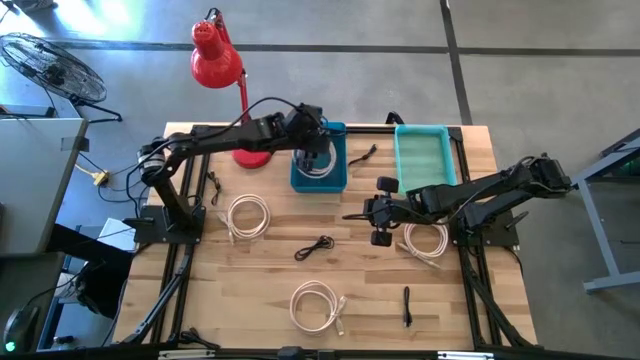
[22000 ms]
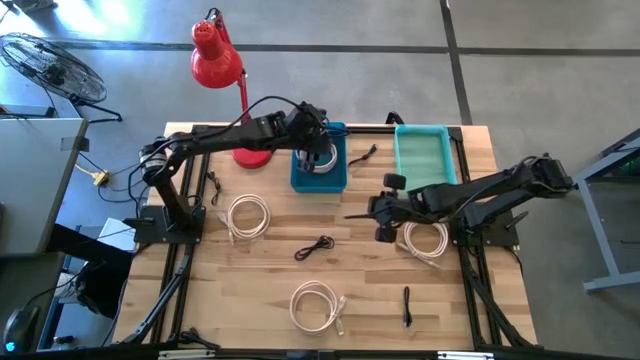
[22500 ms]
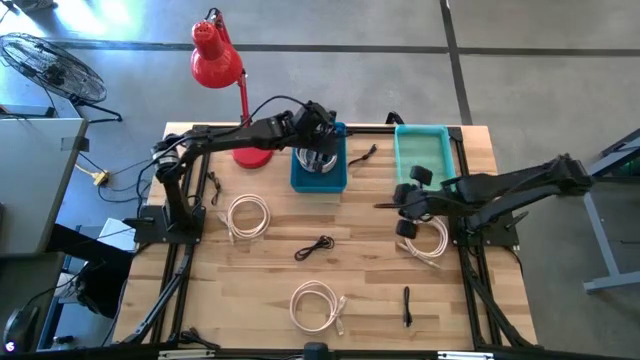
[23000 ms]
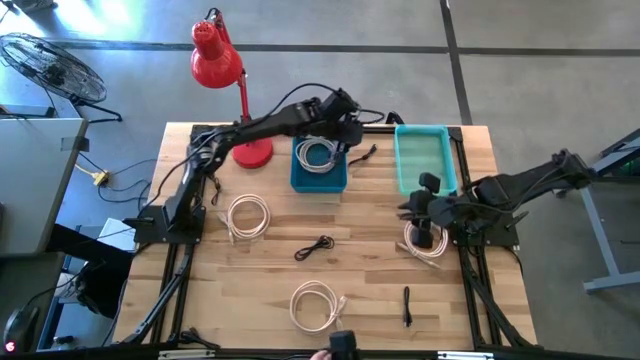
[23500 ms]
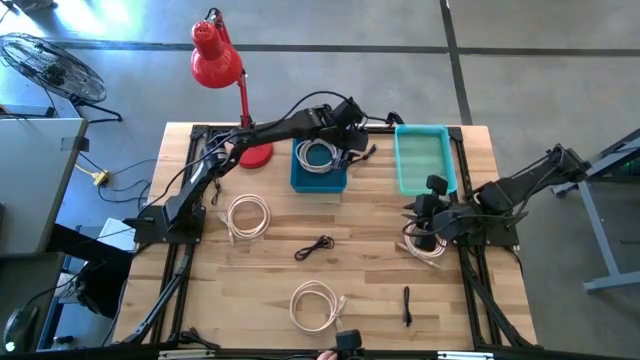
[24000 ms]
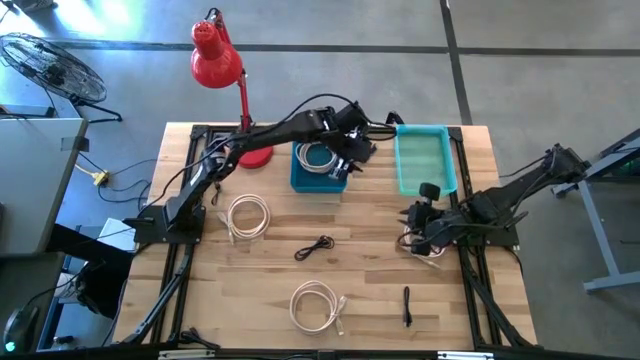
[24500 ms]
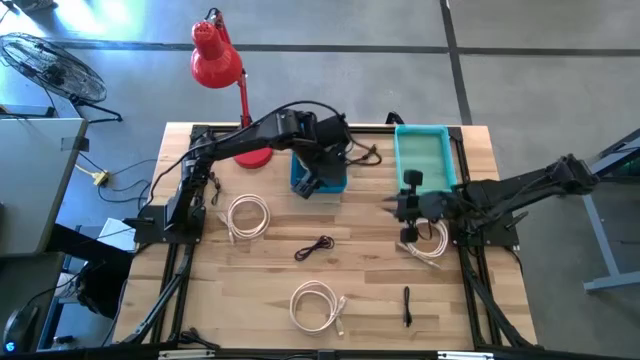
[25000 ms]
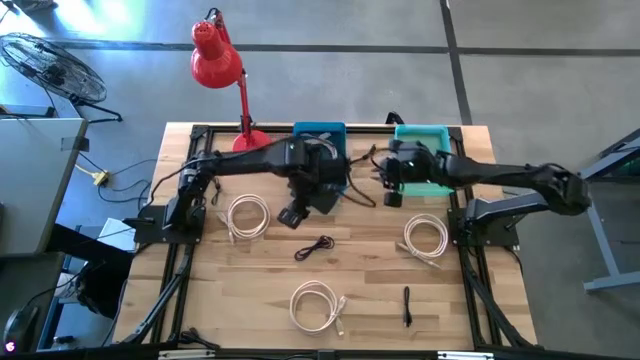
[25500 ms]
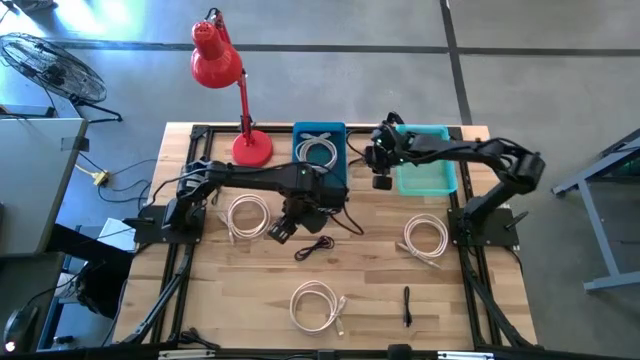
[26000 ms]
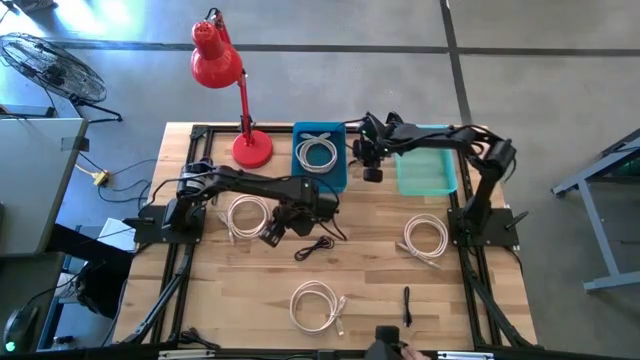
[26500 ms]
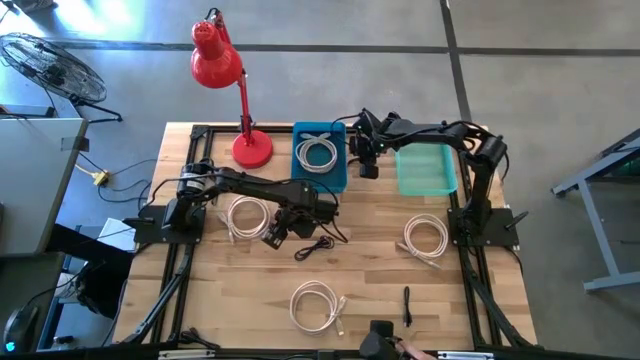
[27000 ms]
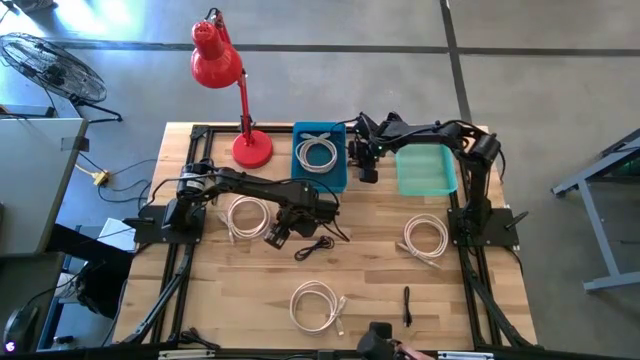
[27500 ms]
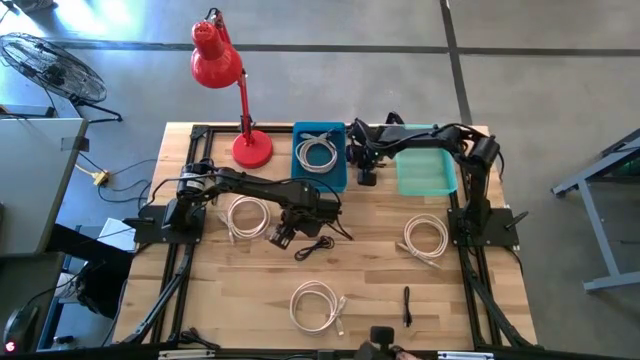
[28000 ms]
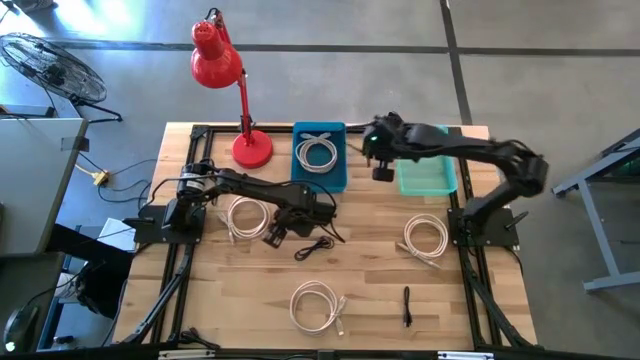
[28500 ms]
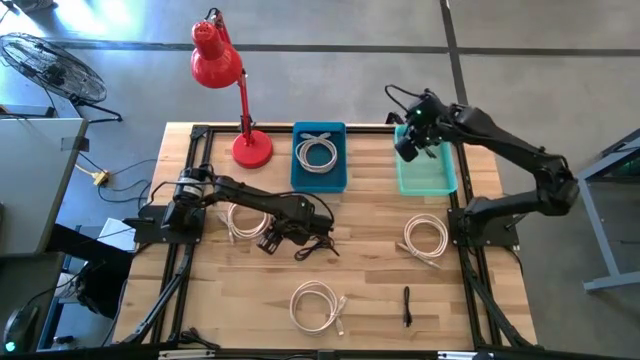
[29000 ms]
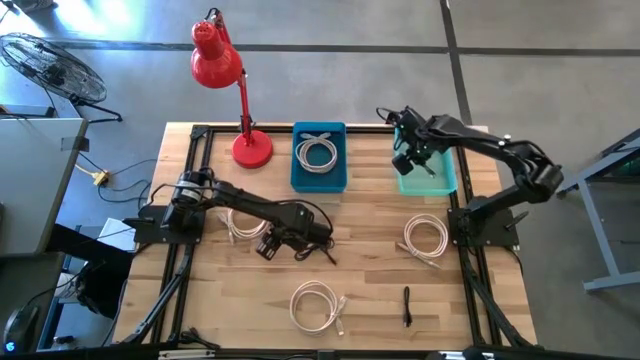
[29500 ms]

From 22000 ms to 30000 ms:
Task: Pick & Place USB Port
Put the black charger cable in the green bin

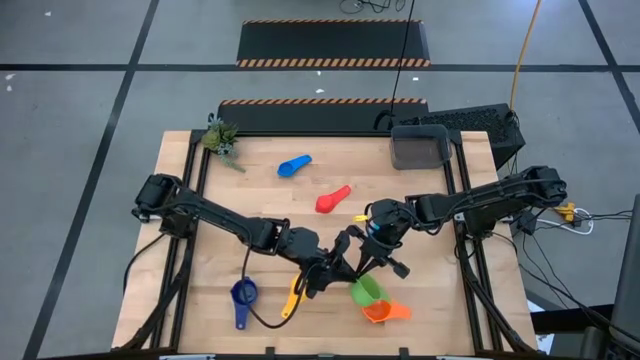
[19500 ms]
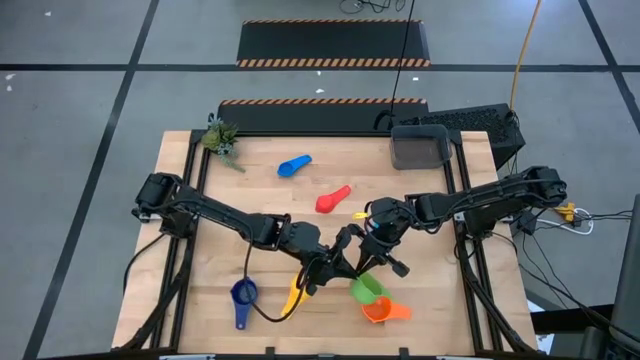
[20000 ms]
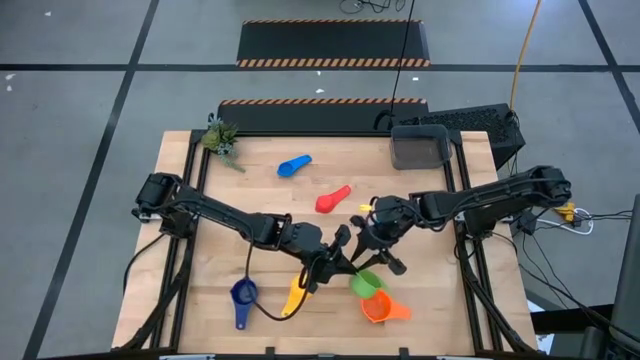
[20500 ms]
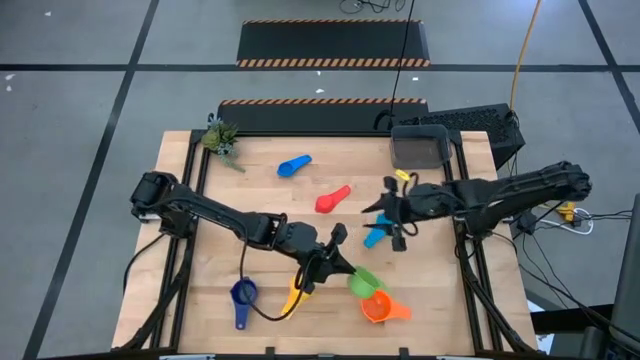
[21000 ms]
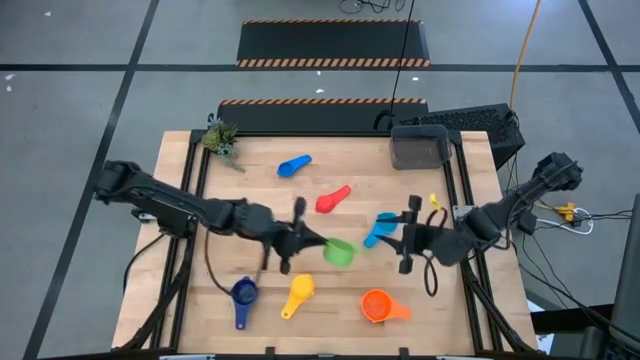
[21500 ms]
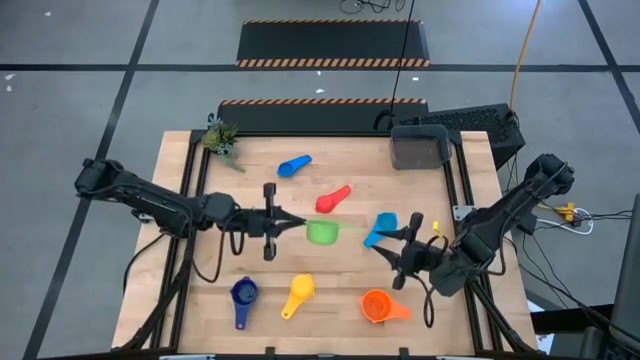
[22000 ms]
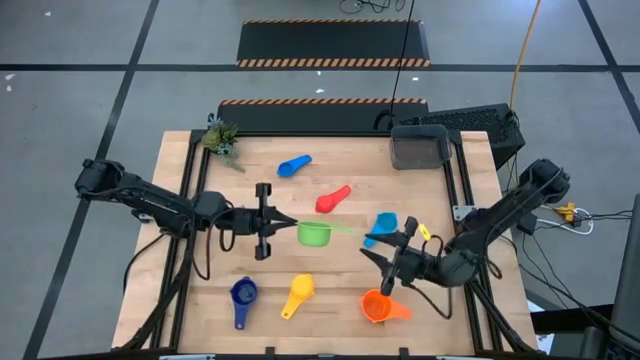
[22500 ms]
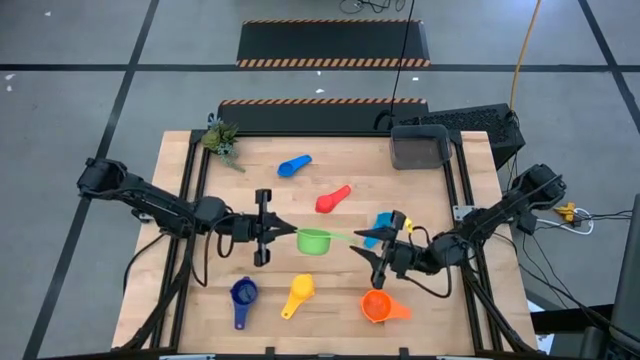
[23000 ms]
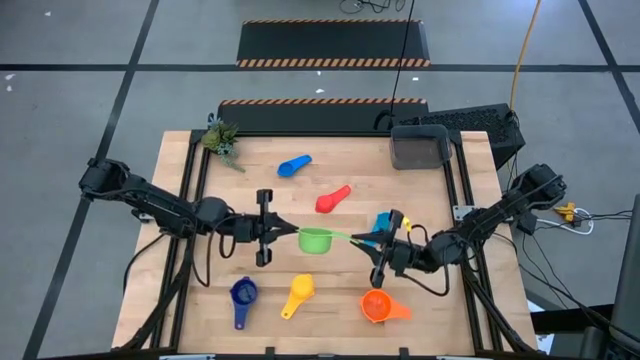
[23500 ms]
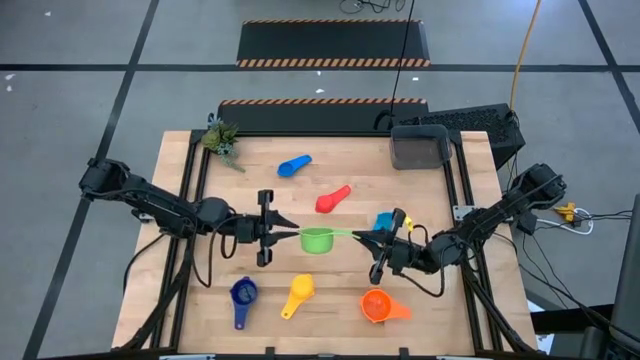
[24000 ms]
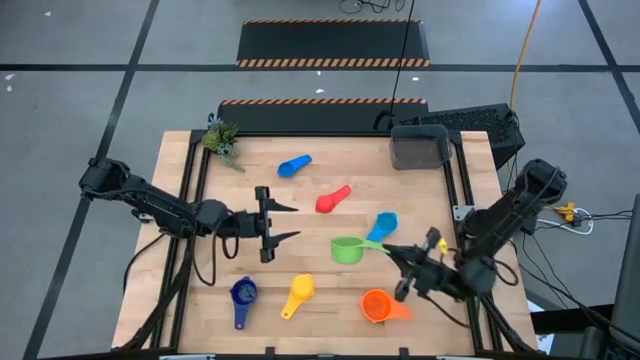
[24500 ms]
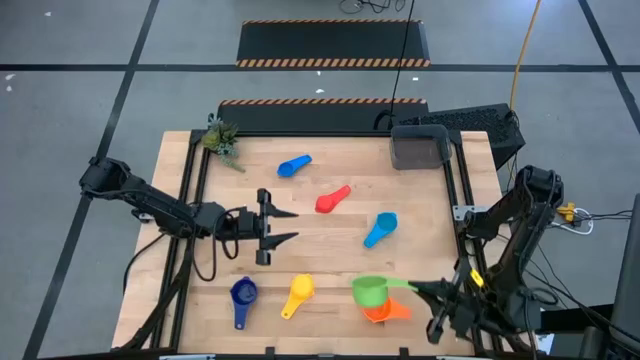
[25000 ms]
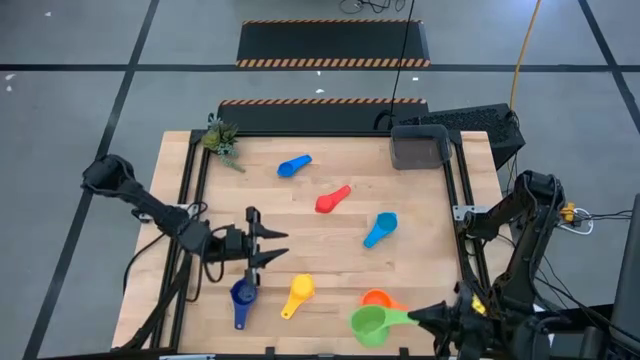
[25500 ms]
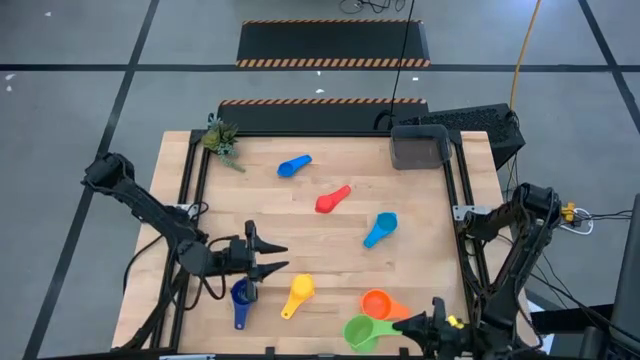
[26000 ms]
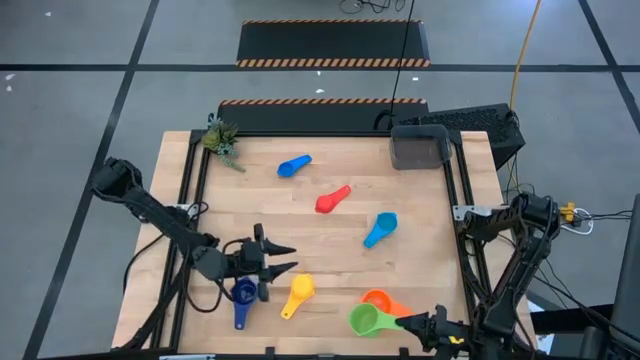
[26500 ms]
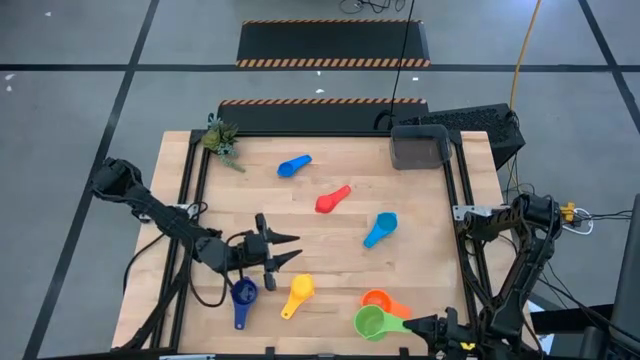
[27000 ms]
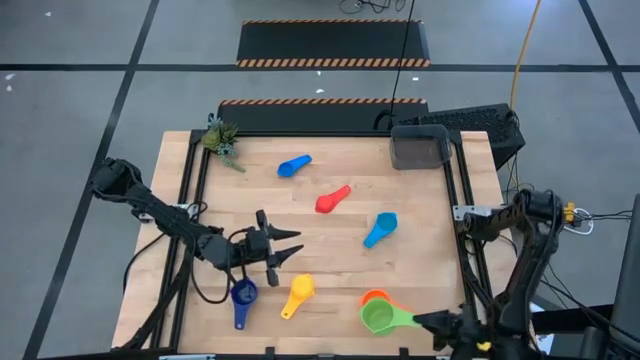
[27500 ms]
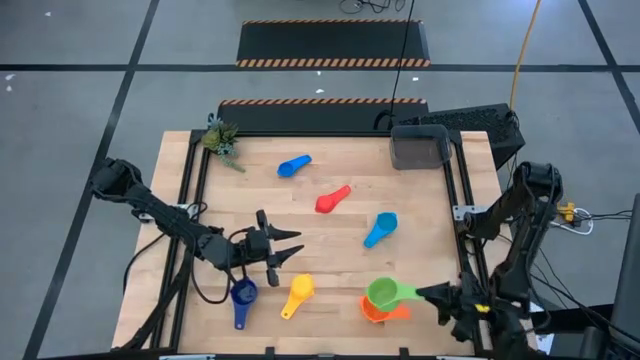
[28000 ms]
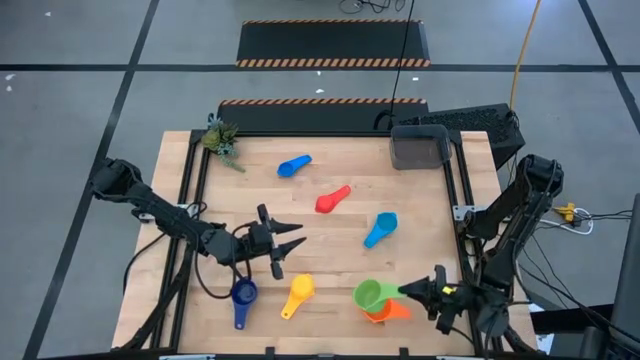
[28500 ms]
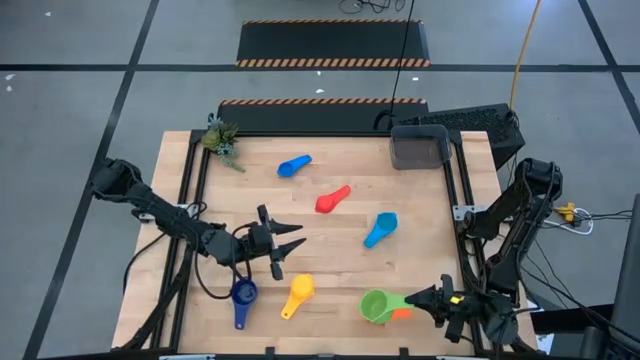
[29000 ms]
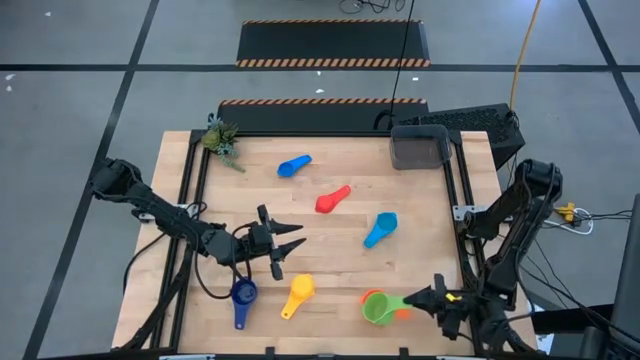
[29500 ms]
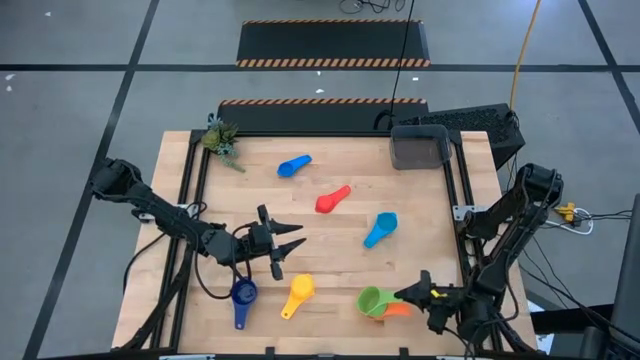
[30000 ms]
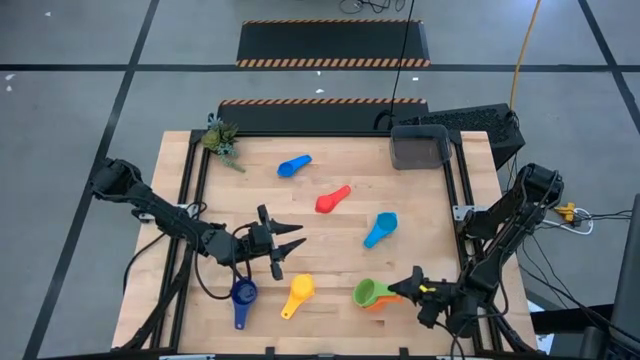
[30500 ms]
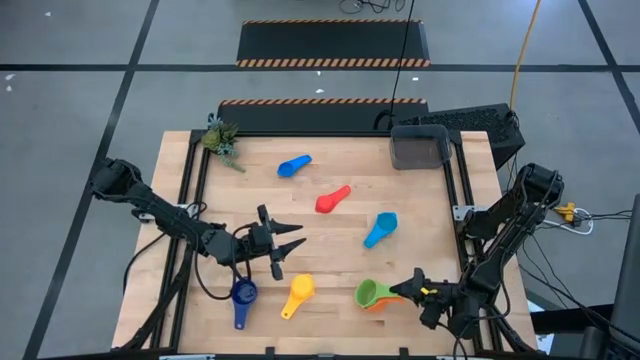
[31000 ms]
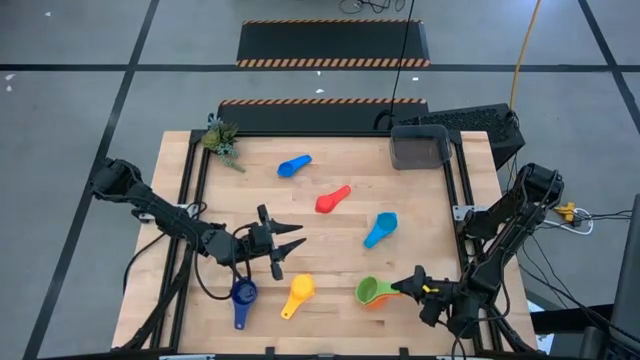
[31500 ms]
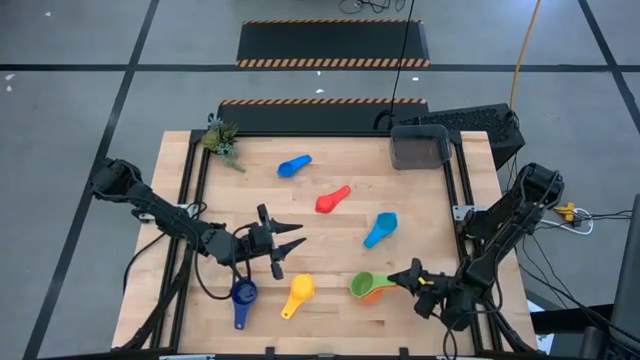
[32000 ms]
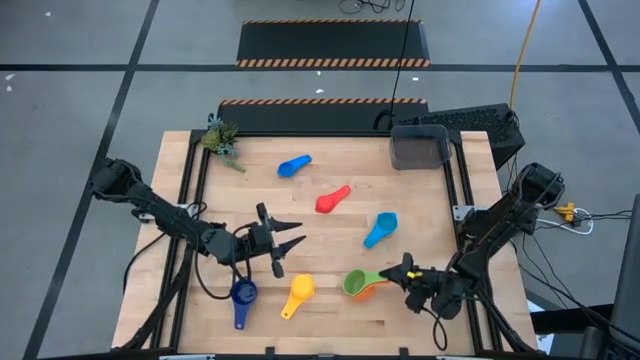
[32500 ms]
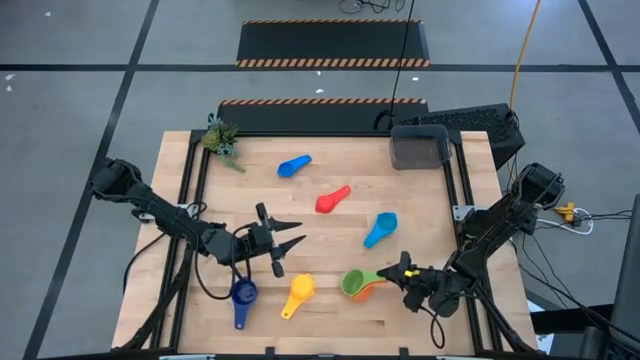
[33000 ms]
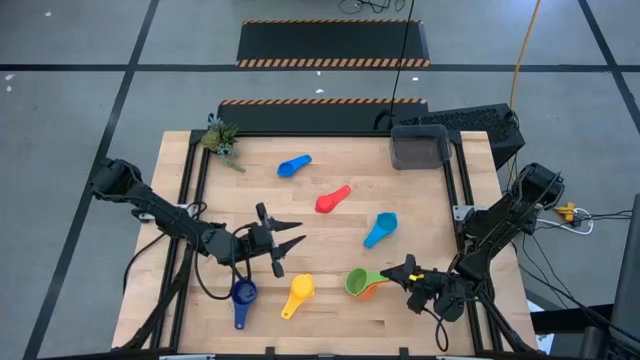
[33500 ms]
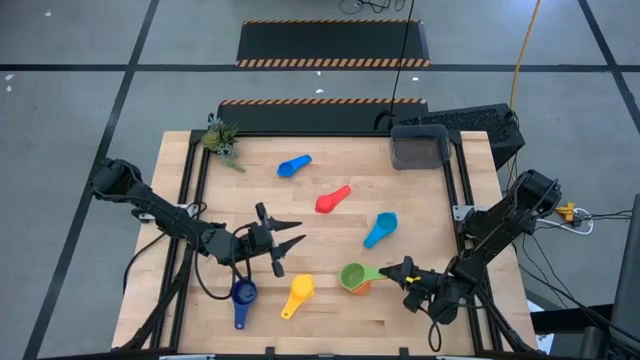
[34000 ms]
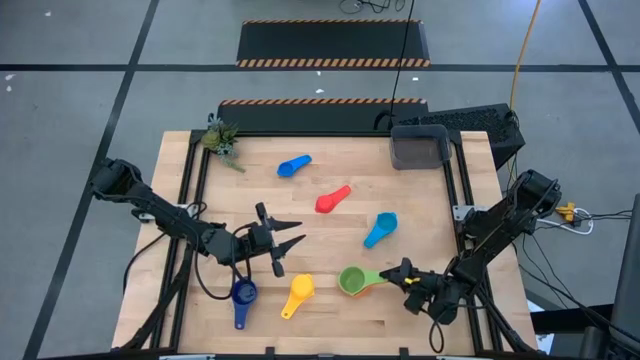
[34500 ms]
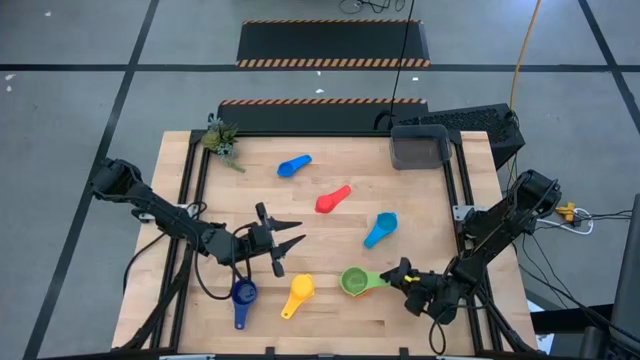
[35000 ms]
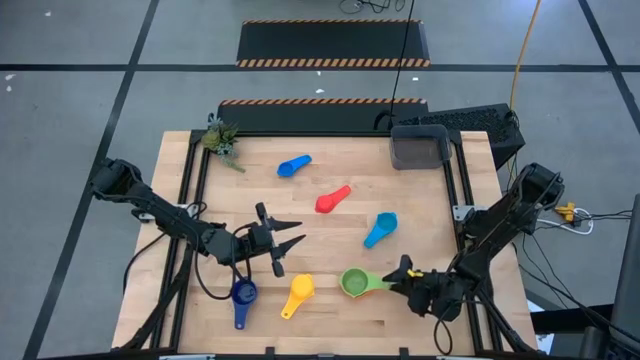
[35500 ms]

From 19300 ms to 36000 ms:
Task: Nest measuring cups in basket
Stack the green measuring cup on top of the orange measuring cup
